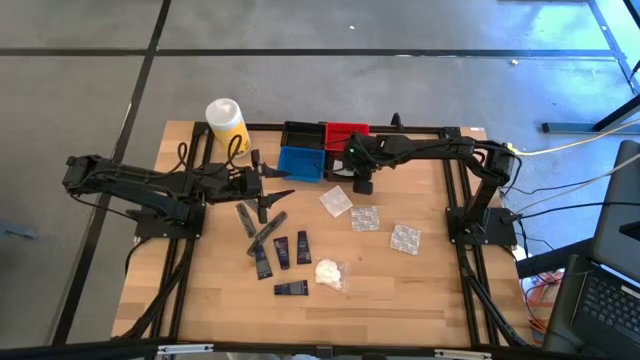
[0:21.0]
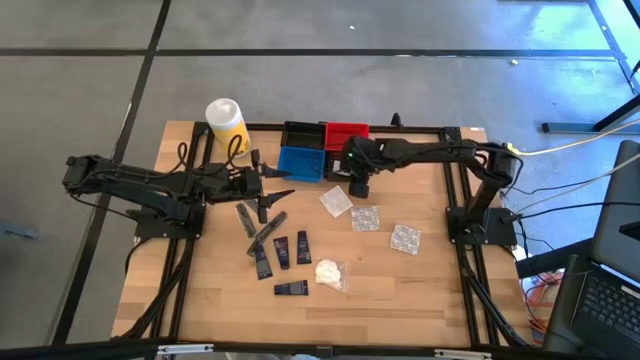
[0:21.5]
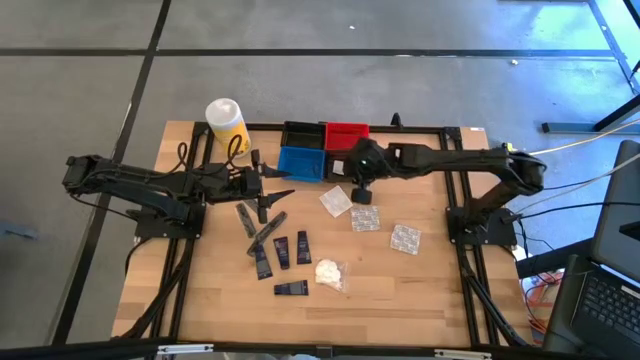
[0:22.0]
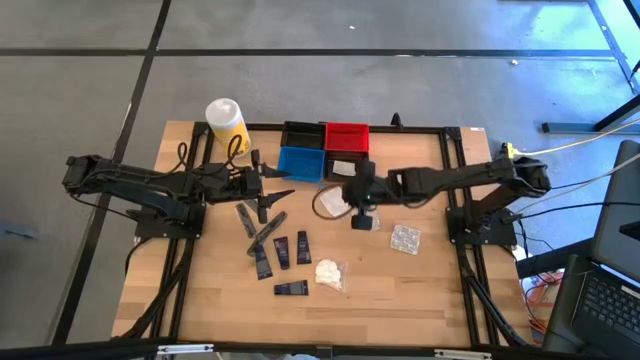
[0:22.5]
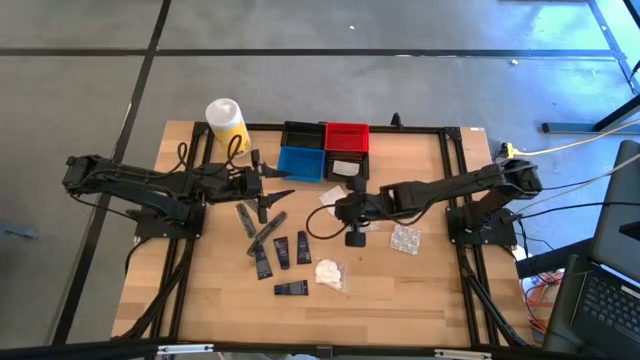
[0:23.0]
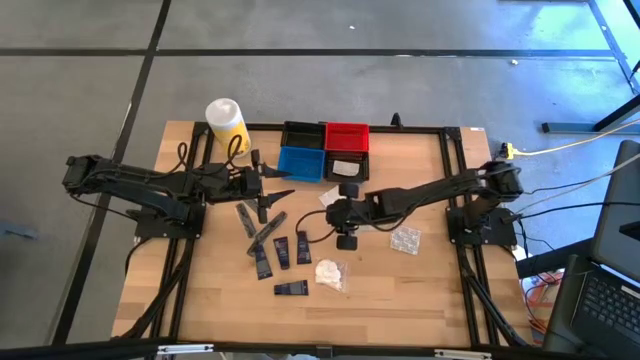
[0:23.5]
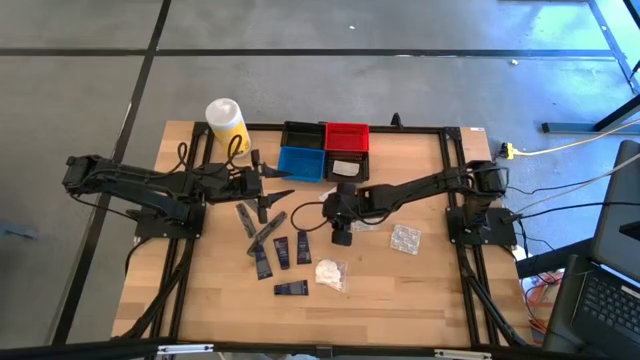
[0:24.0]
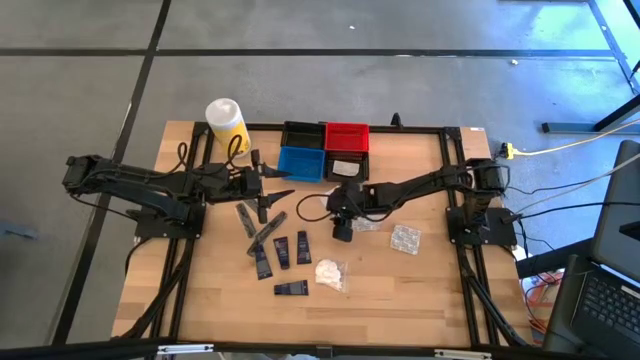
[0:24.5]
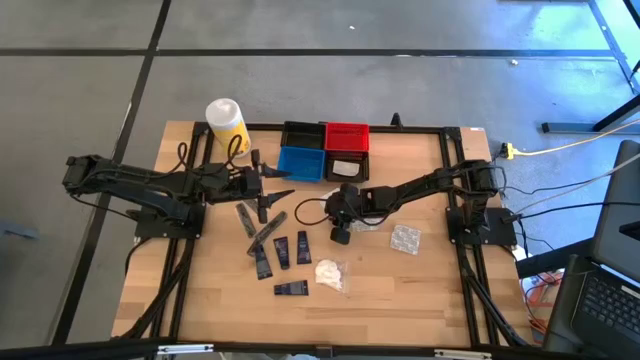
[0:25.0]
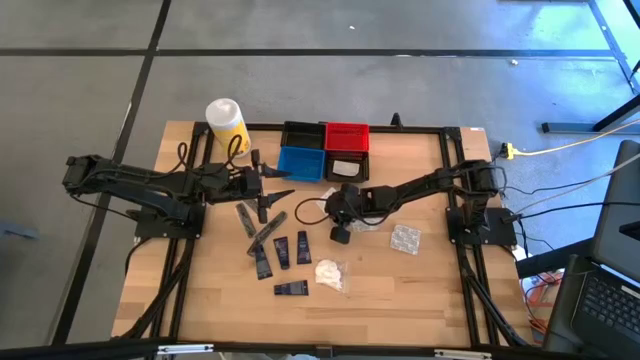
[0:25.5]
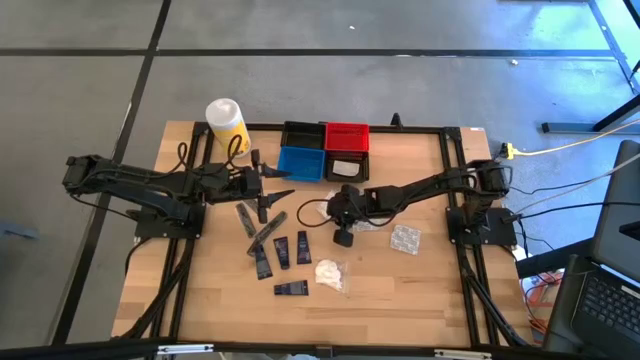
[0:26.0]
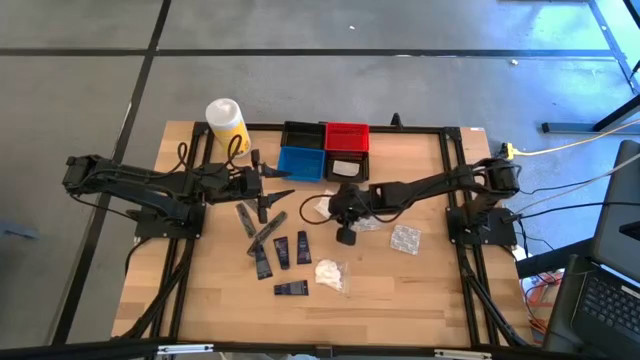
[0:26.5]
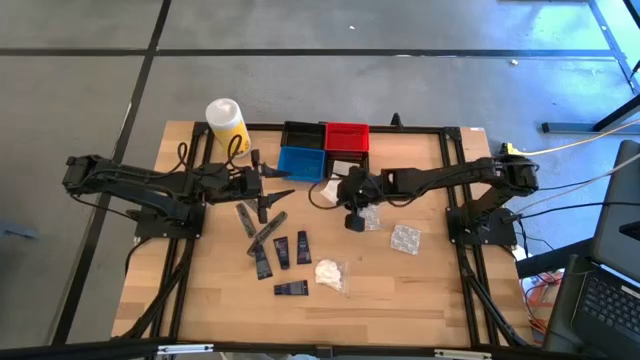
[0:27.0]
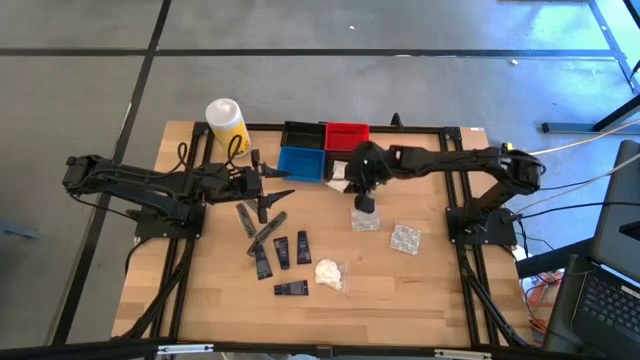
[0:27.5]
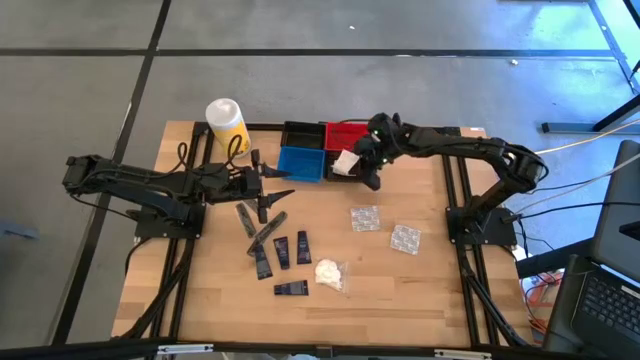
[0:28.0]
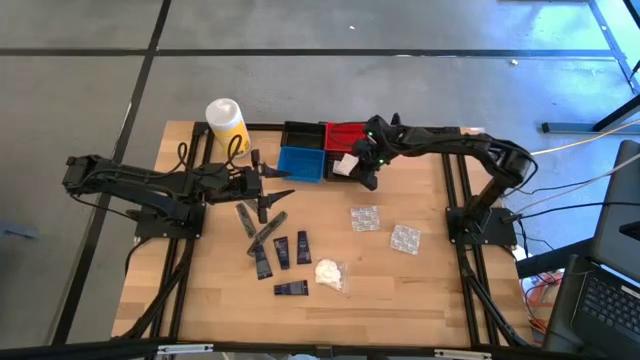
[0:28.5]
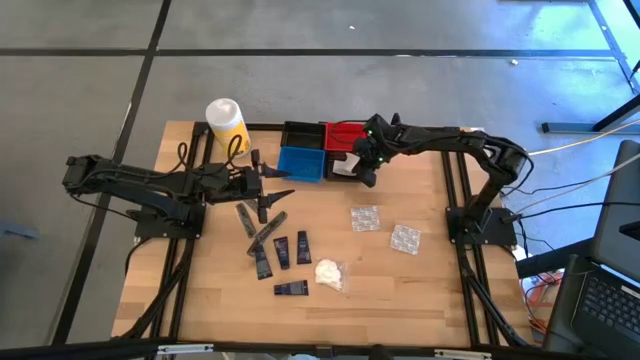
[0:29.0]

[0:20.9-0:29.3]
Task: Pick & Place Travel size toiletries
Put the left bandage pack into the bottom black bin

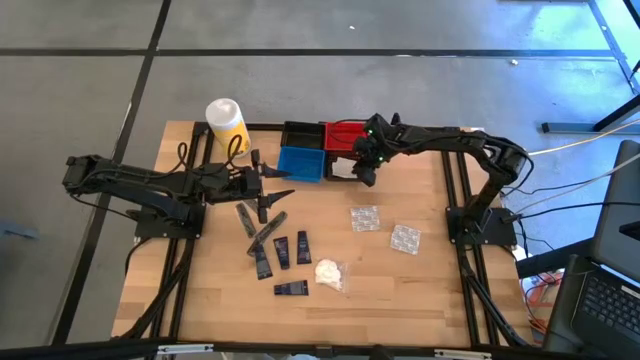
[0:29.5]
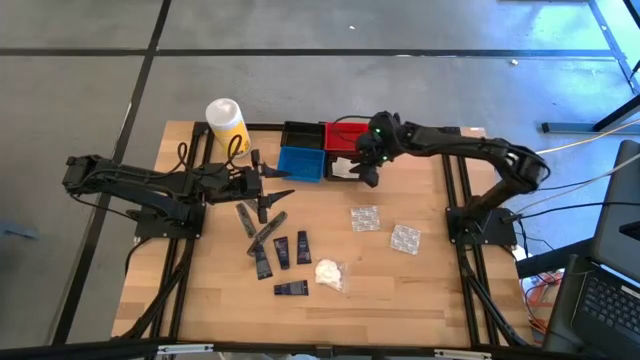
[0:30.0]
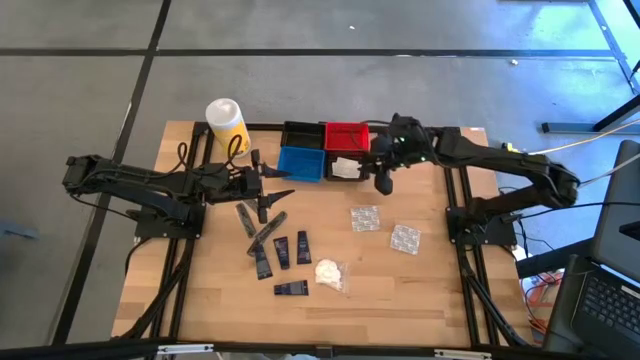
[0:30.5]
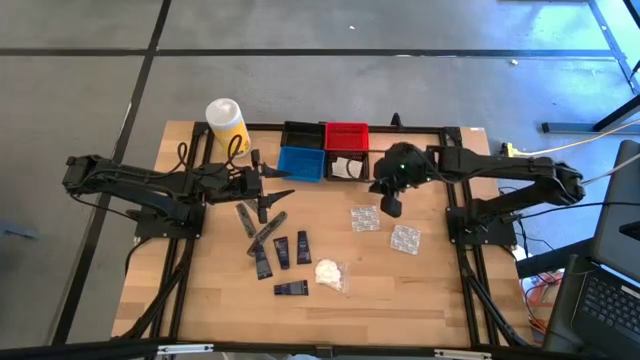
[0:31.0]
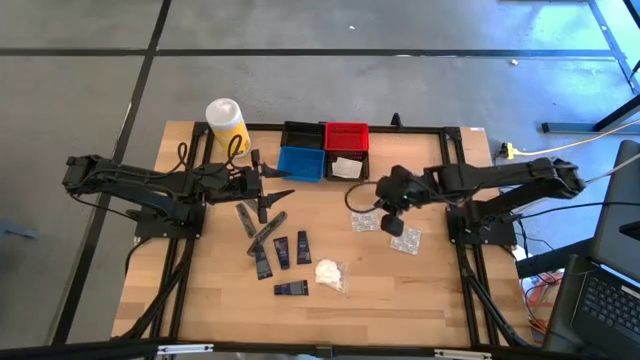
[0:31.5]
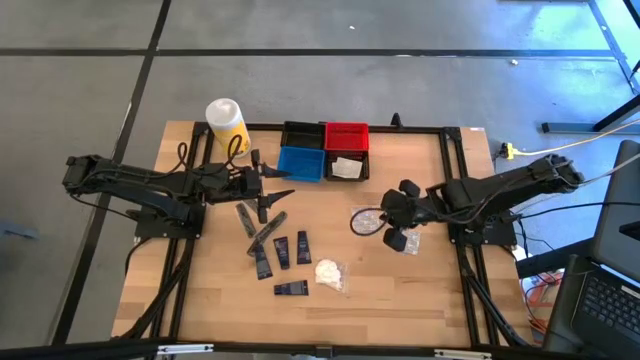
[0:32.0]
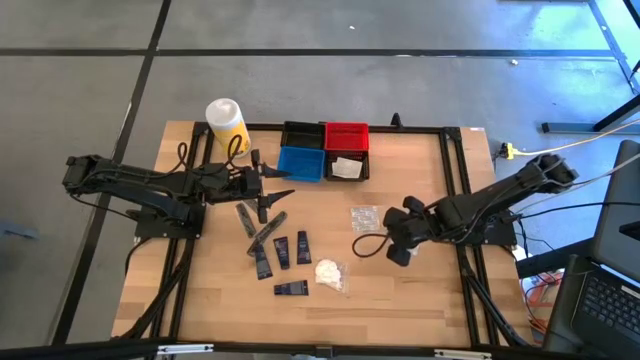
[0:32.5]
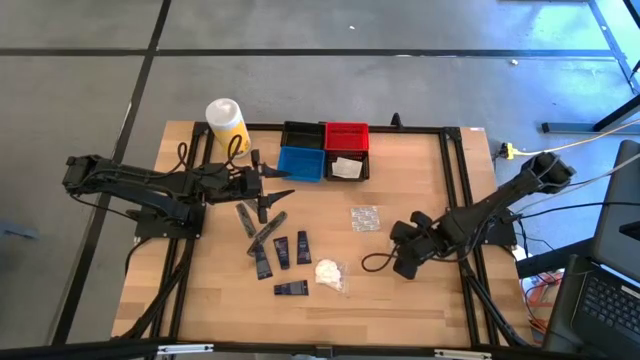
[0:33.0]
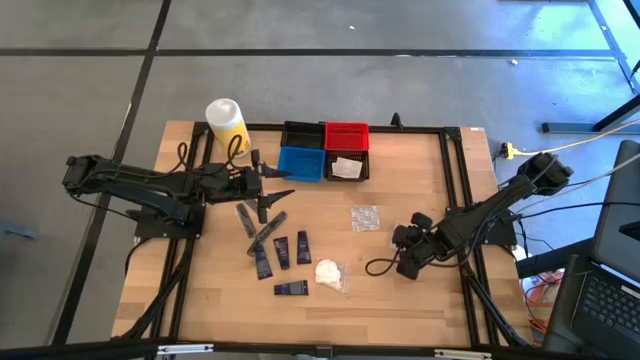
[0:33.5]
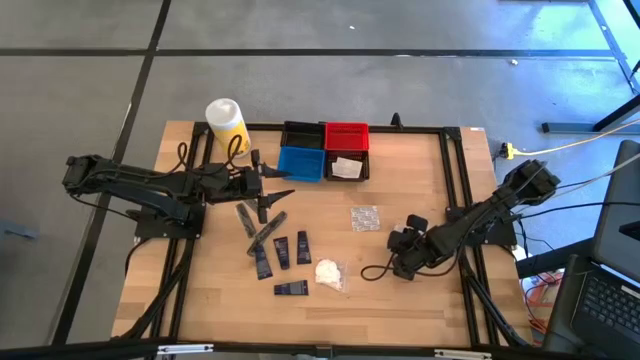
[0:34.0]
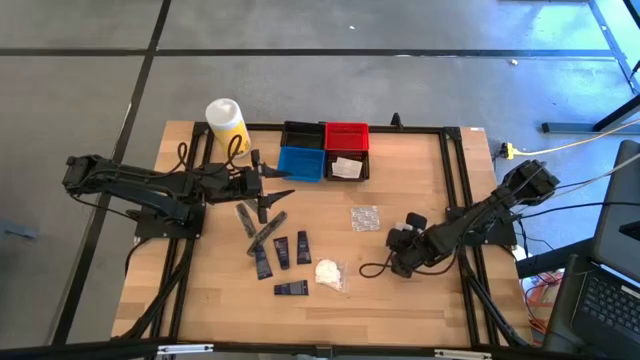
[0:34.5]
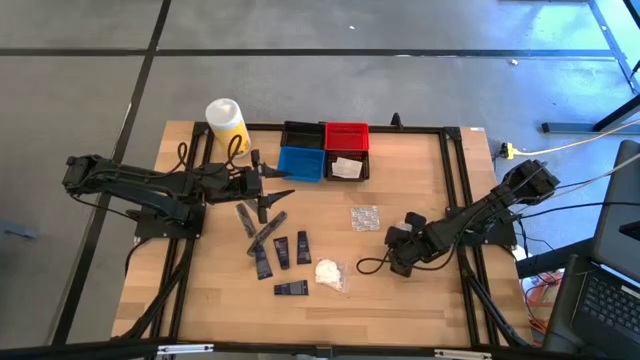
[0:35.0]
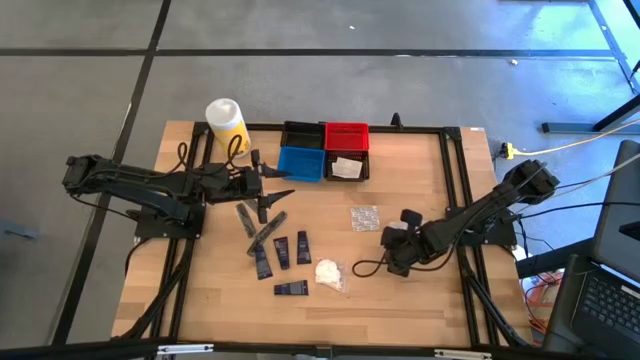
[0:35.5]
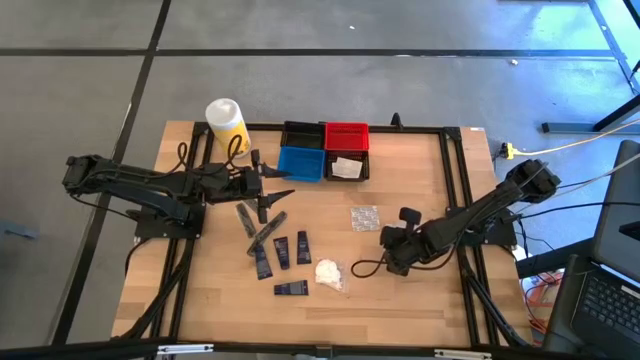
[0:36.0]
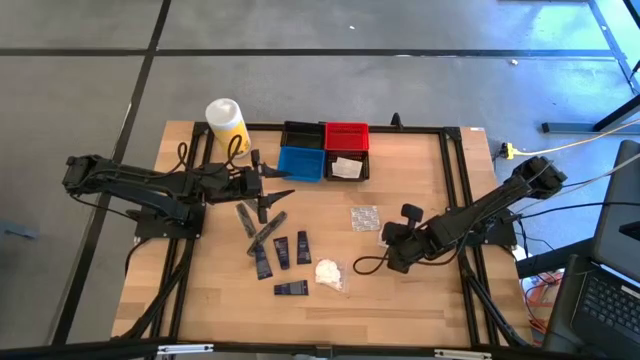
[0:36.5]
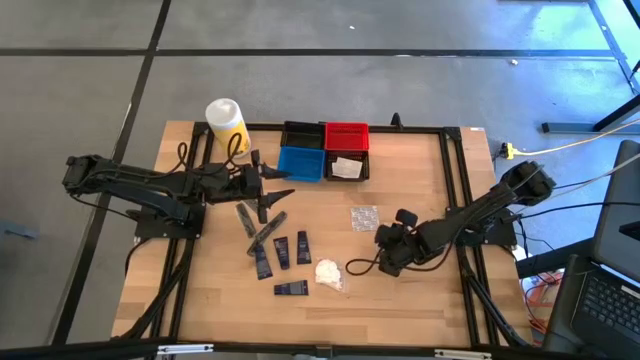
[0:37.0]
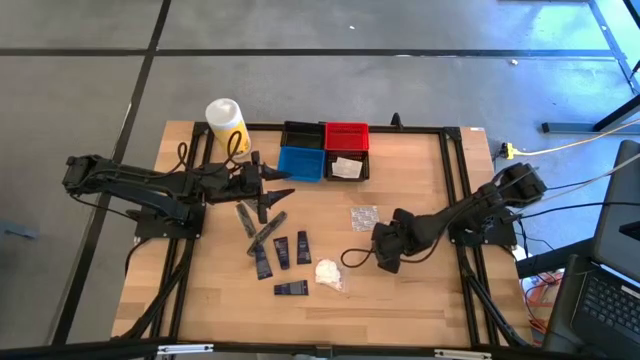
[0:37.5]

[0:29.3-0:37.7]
Put the right bandage pack into the bottom black bin

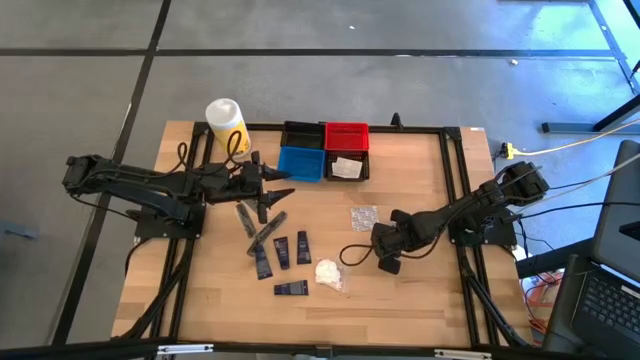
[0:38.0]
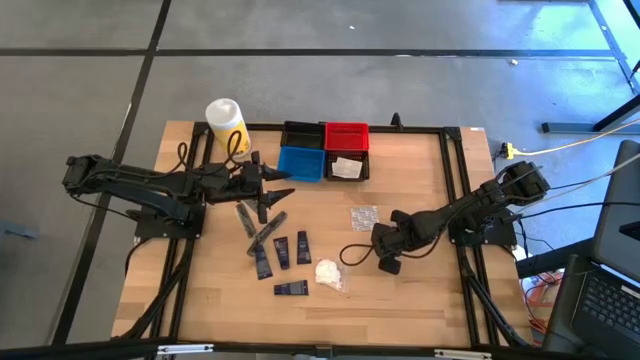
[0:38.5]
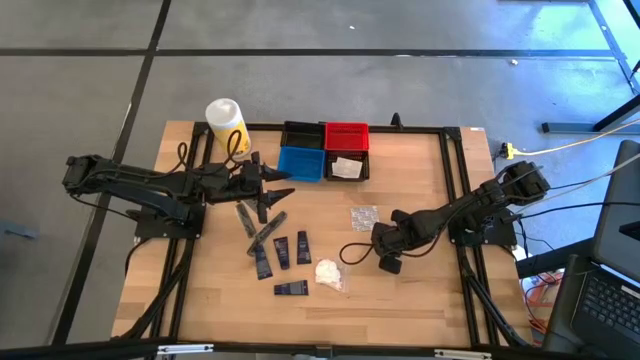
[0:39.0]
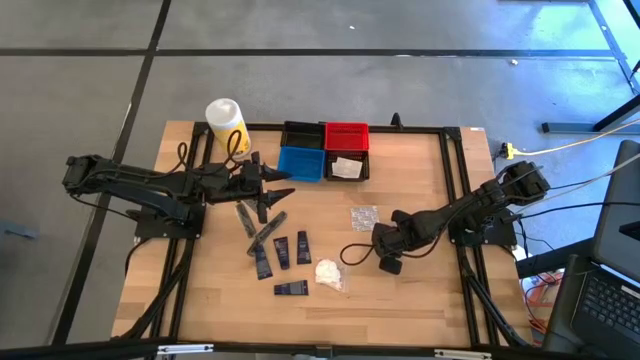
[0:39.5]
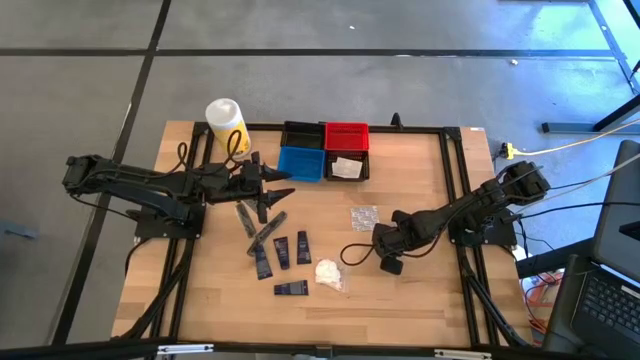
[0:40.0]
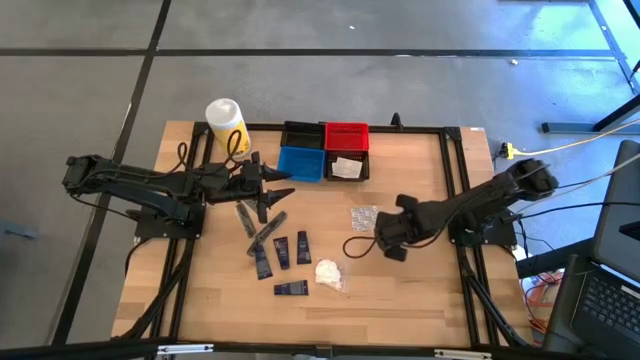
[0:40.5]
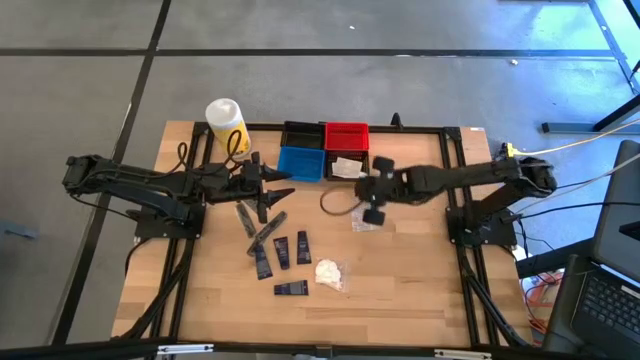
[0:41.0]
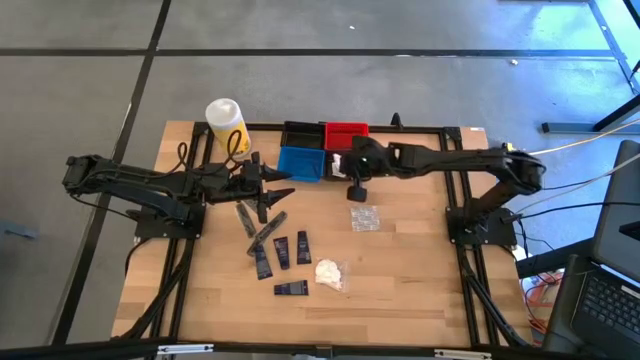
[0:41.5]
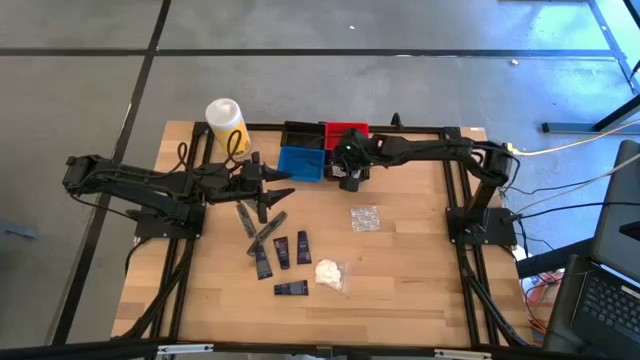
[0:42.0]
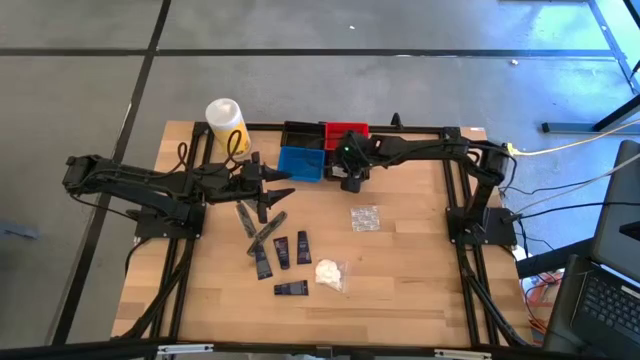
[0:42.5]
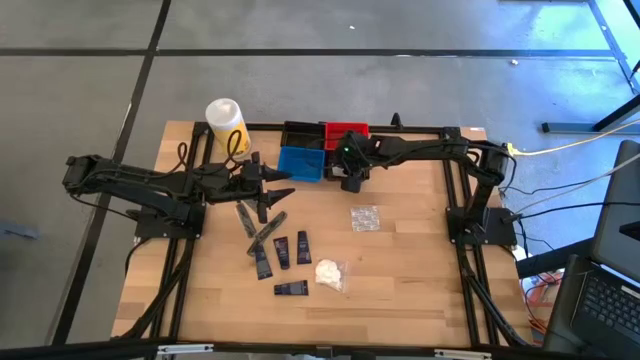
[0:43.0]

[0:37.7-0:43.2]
Put the right bandage into the bottom black bin
